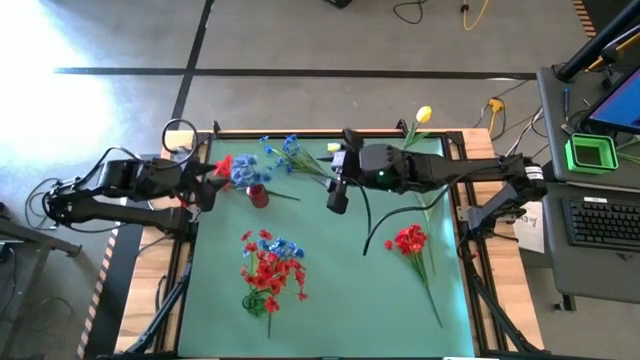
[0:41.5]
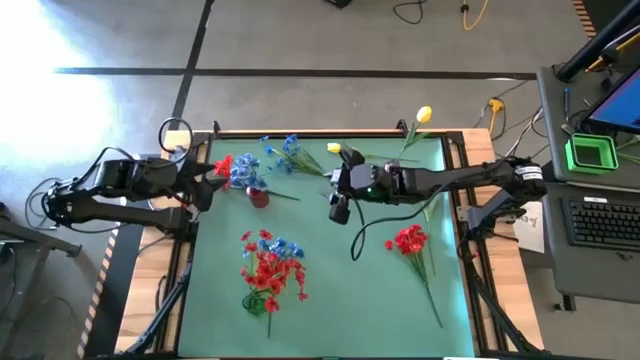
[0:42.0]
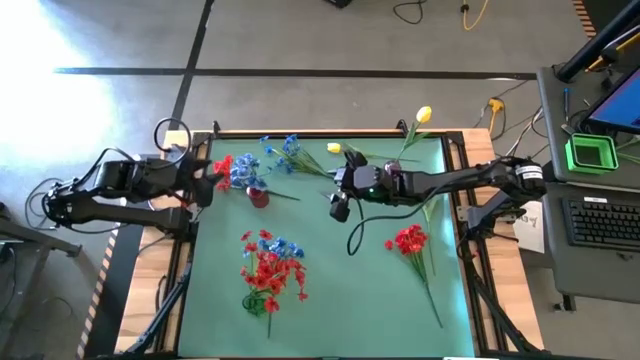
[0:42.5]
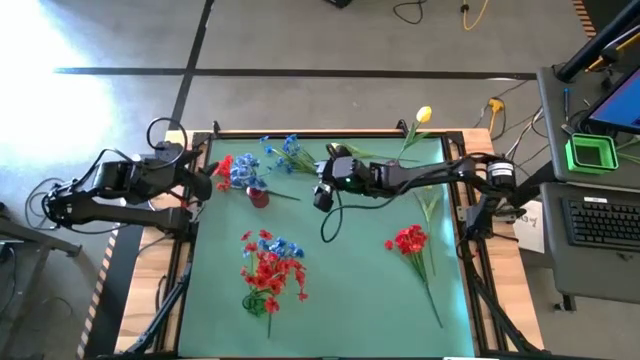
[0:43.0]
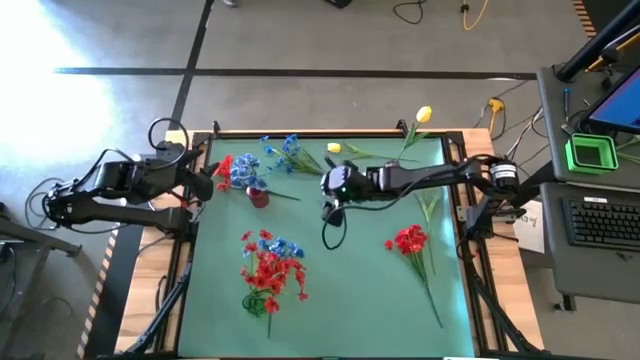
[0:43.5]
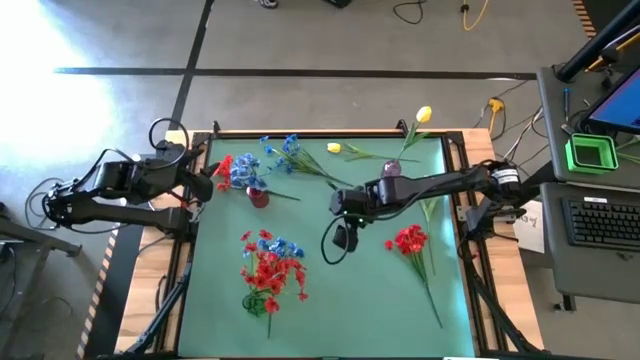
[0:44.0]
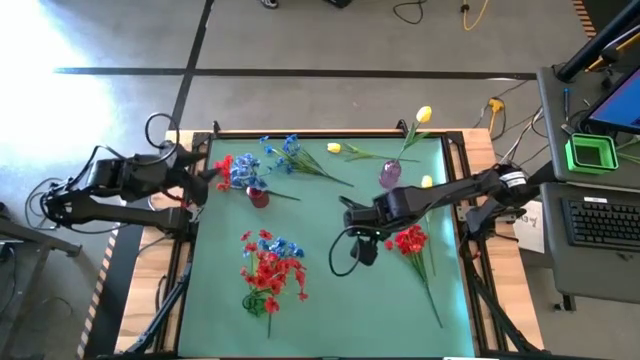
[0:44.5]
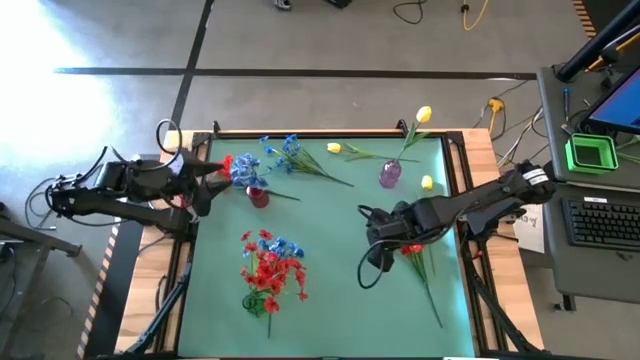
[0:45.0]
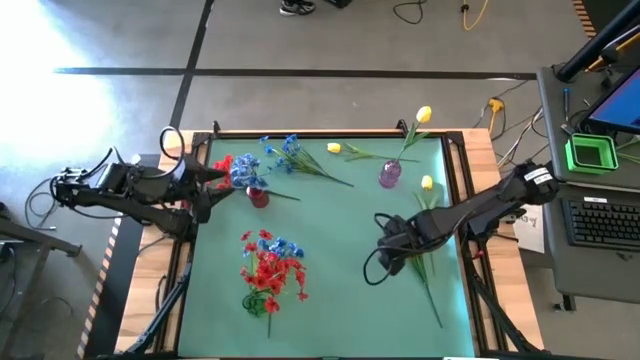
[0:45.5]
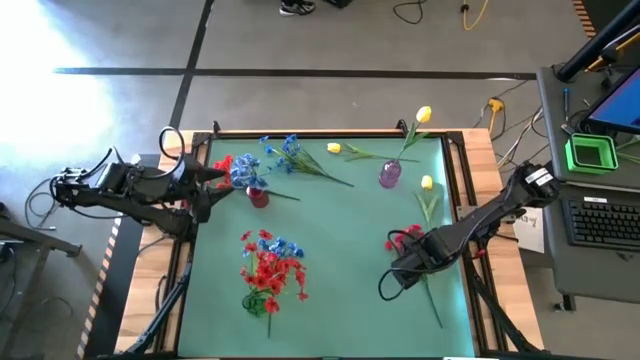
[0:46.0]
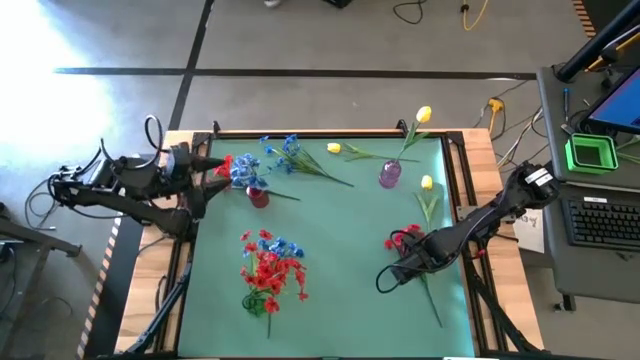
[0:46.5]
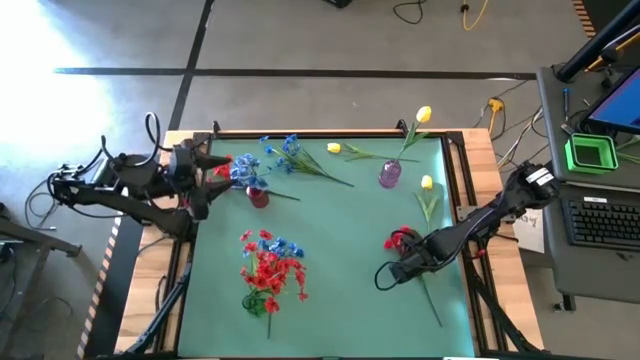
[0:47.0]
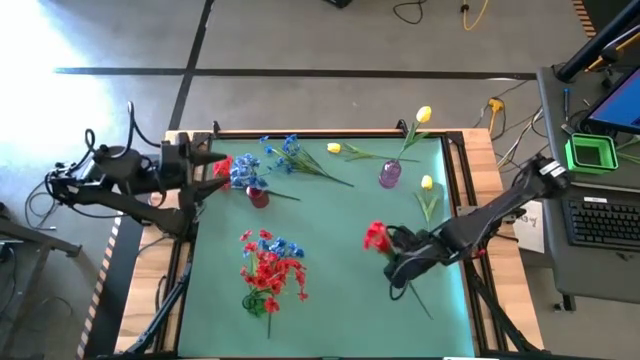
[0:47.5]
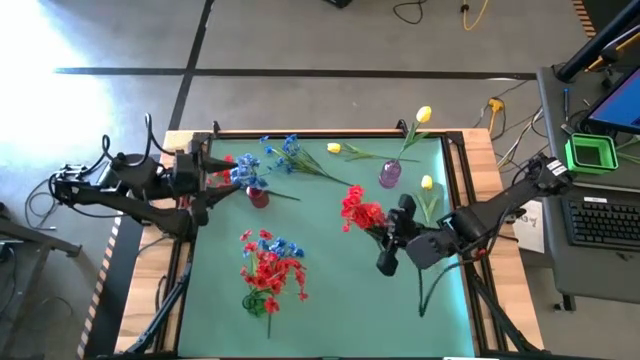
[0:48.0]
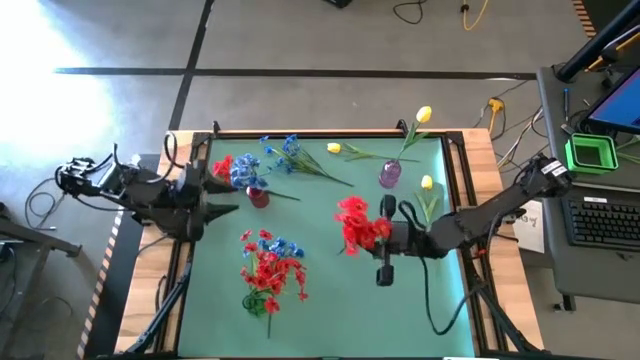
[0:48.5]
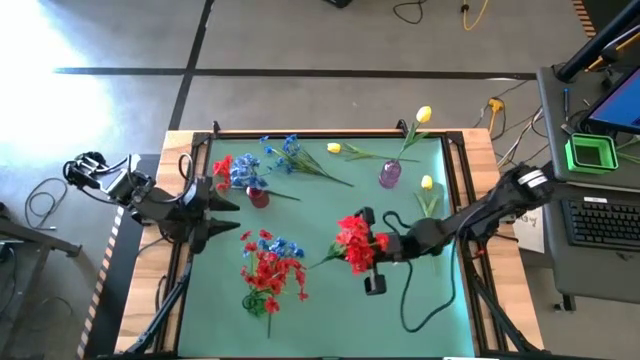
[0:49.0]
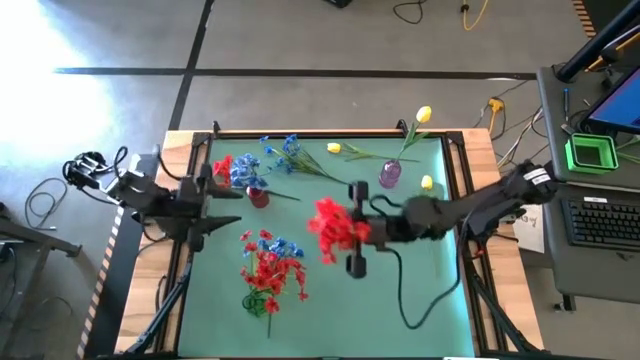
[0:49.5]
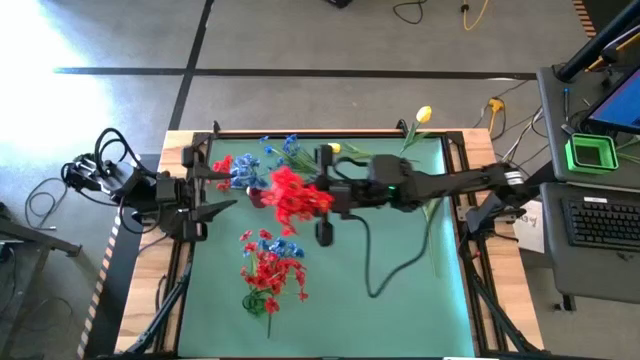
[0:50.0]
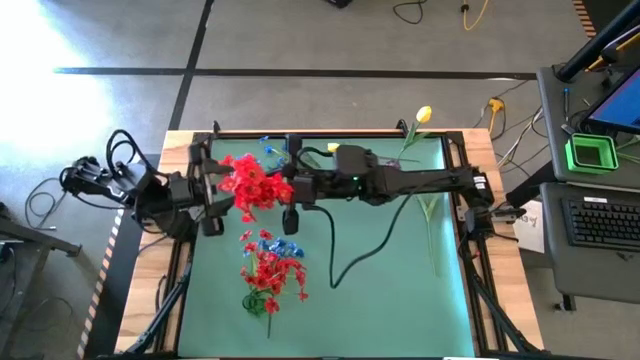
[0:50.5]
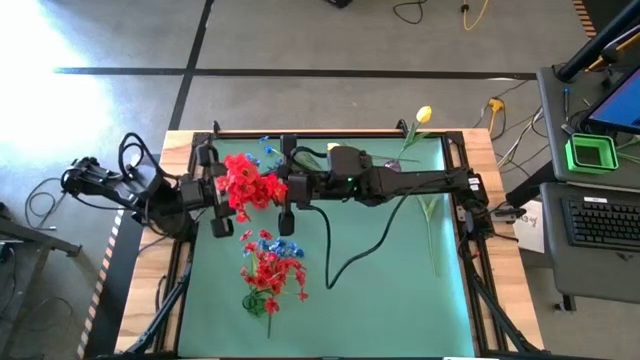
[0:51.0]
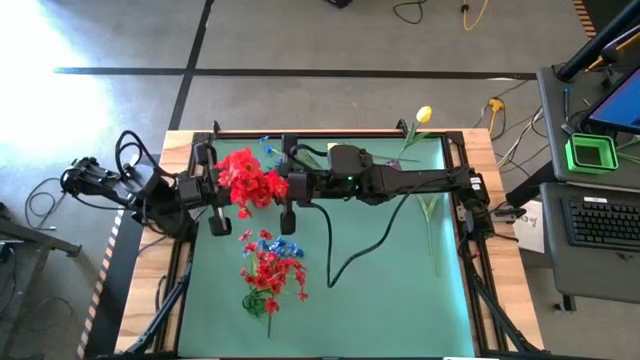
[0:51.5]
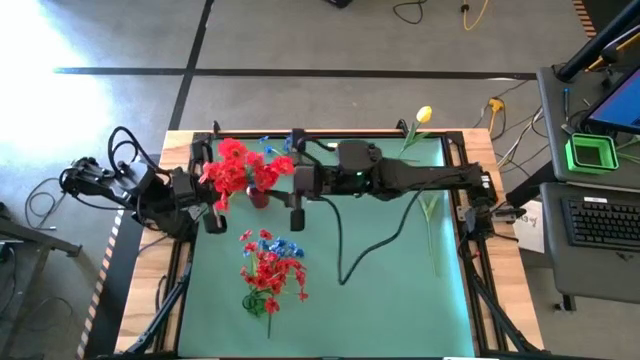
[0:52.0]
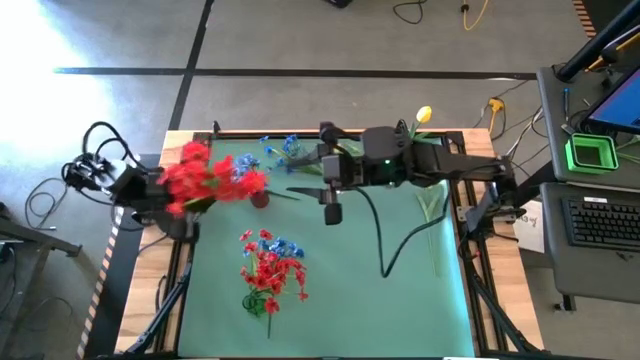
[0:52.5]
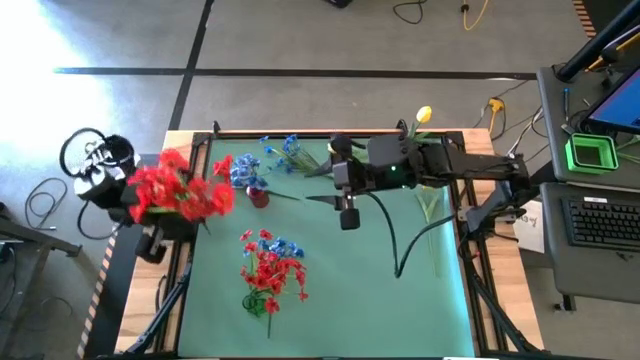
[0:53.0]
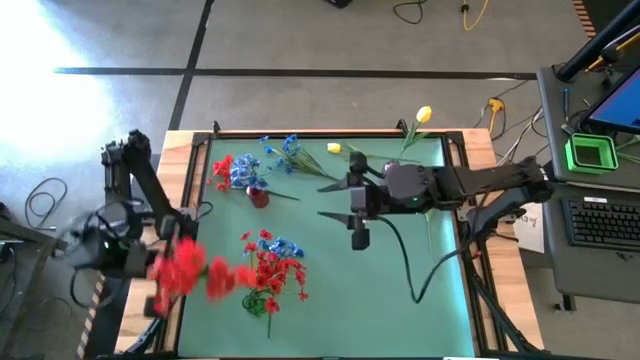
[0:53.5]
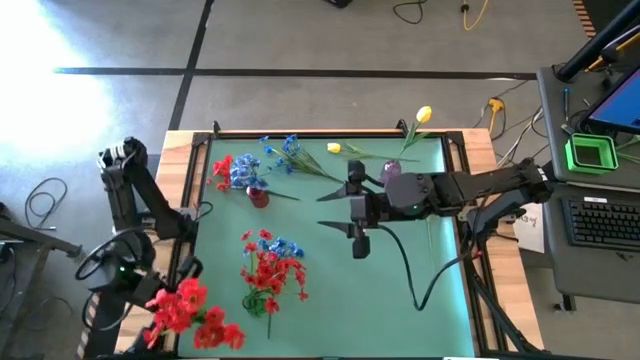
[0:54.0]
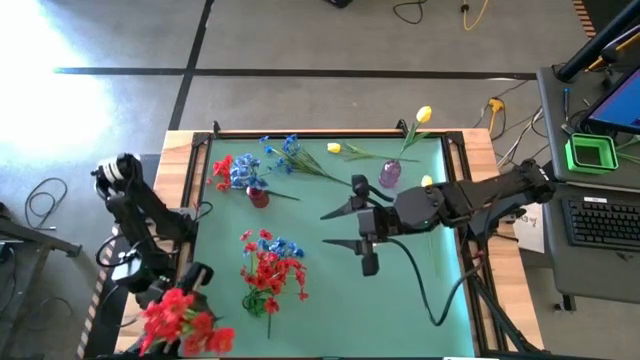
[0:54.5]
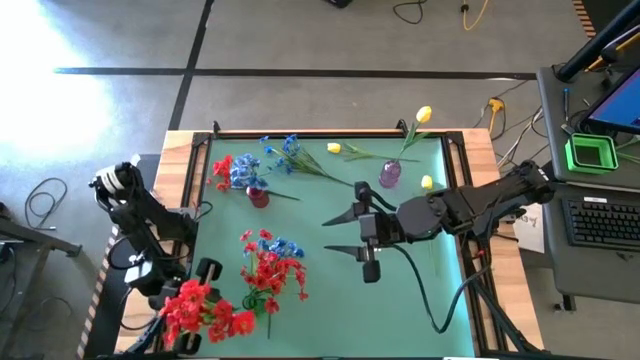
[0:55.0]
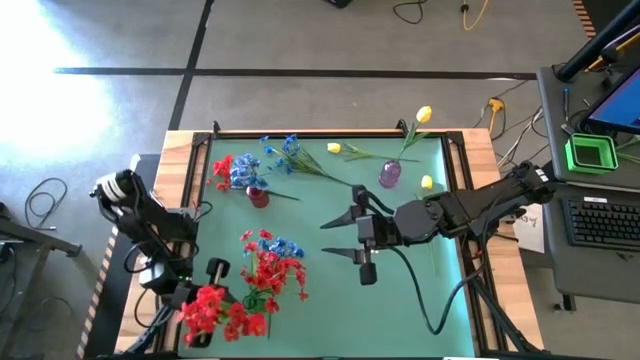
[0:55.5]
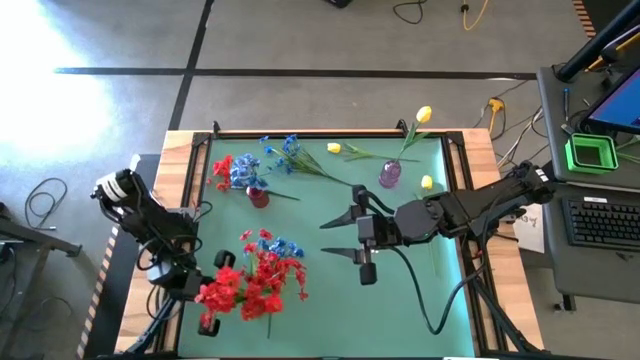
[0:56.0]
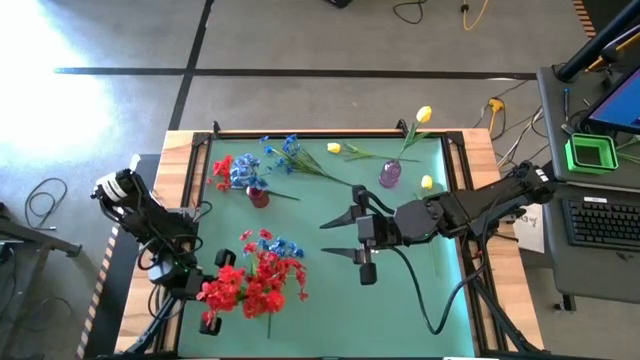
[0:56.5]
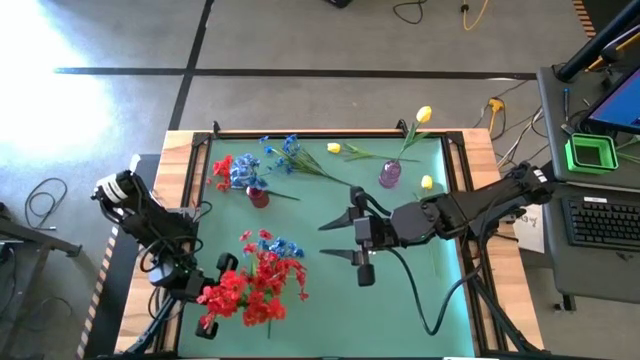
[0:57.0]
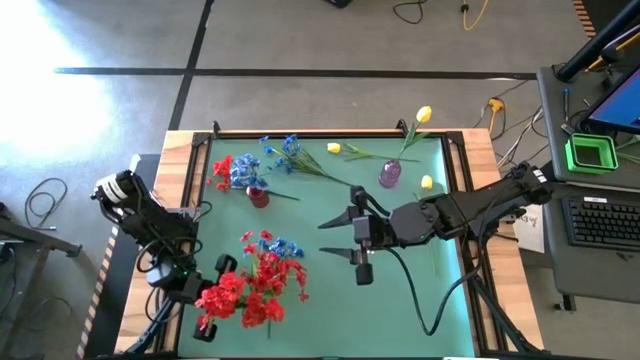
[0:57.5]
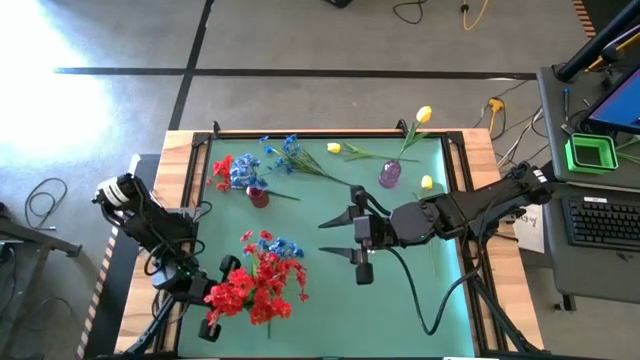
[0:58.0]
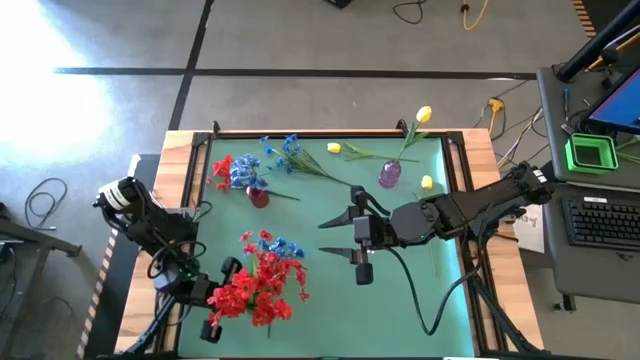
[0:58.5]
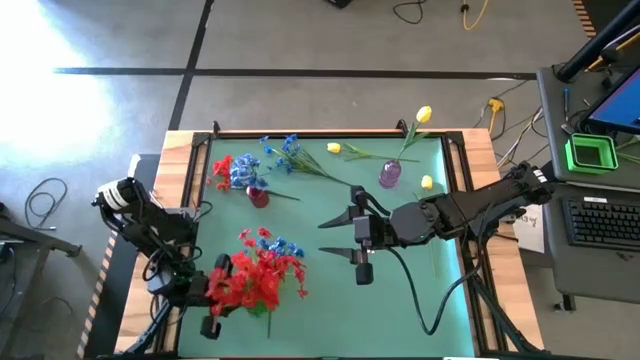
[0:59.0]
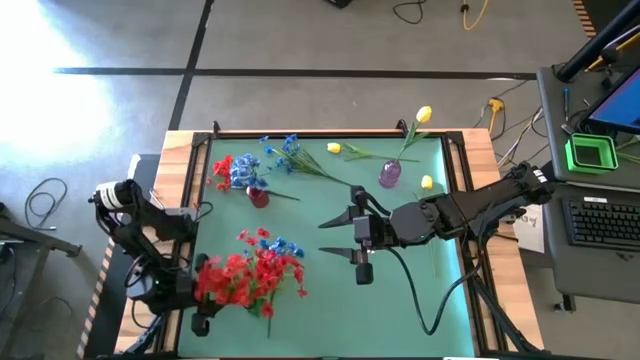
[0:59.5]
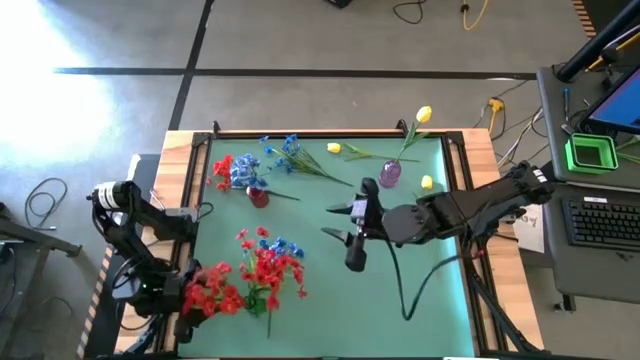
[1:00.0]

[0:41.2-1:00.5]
Task: Sort flowers into vase by color
Put the bottom red flower into the green vase

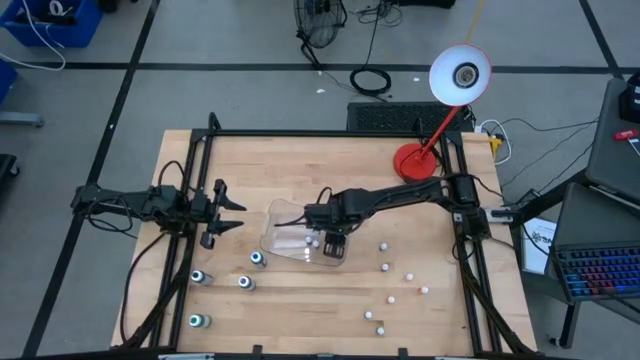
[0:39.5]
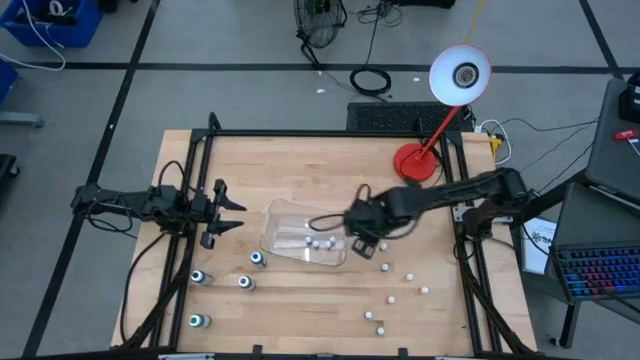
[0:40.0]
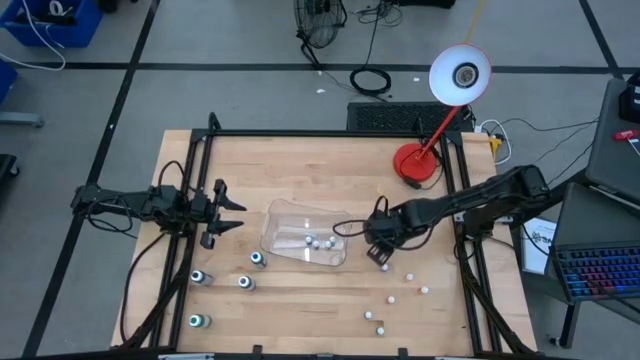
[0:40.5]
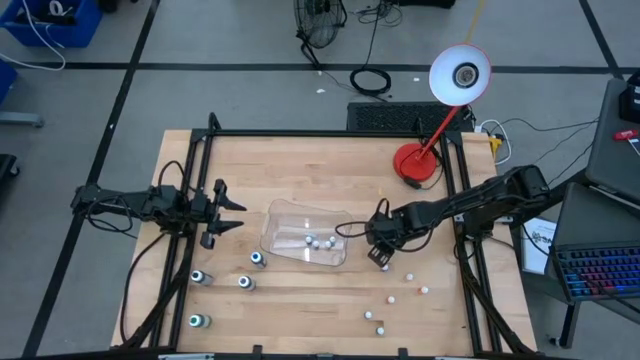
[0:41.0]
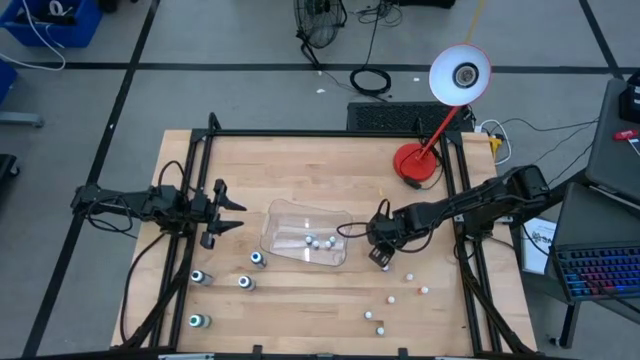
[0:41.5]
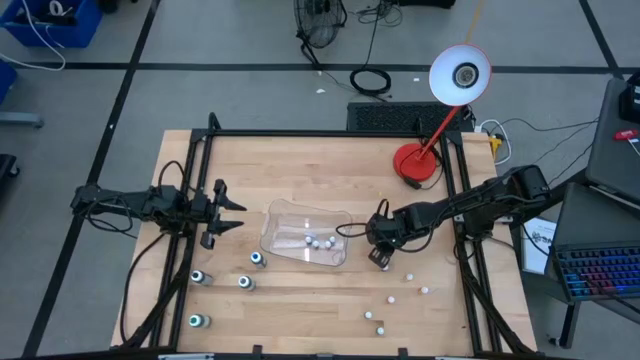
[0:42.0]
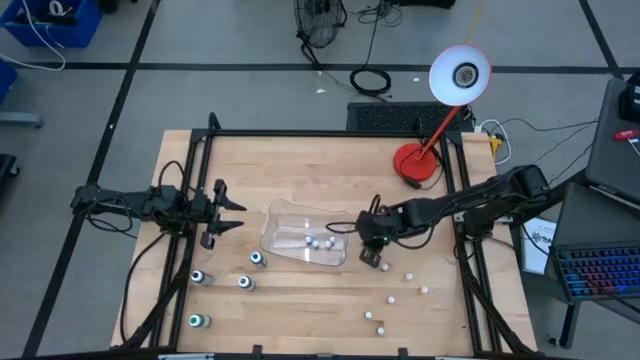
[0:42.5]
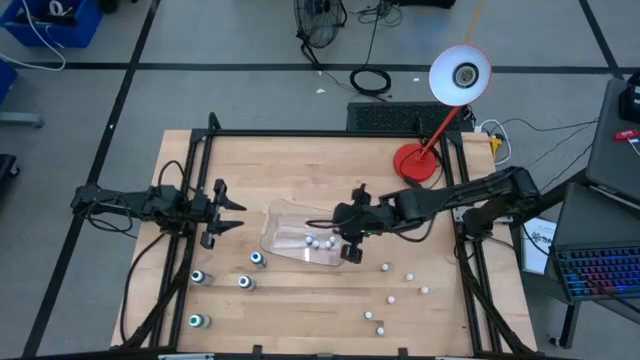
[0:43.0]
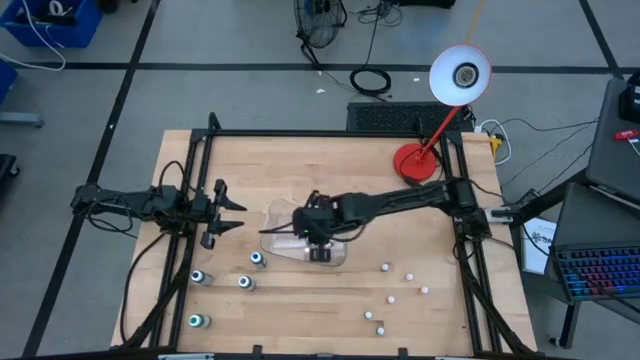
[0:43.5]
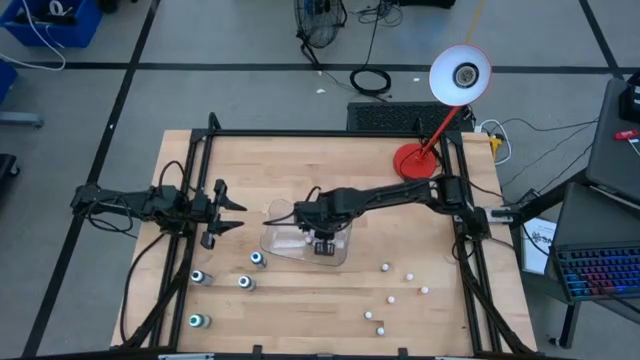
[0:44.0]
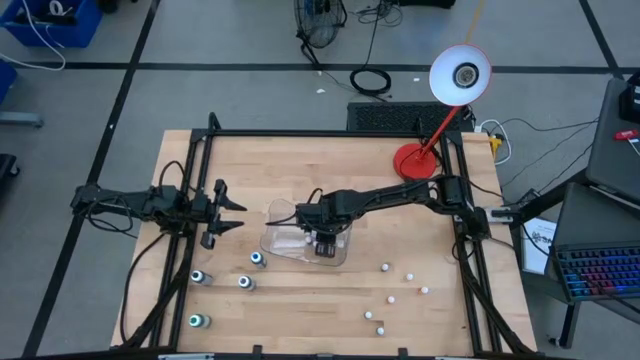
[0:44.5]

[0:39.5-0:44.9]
Task: Pick & Place food coloring
Put the small blue food coloring bottle into the transparent bin
